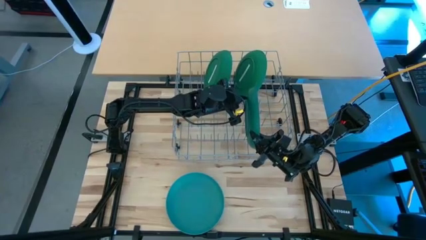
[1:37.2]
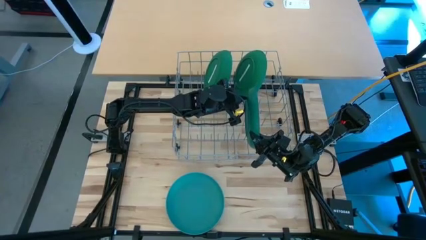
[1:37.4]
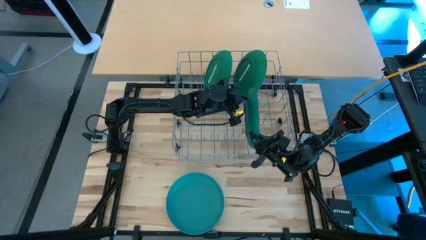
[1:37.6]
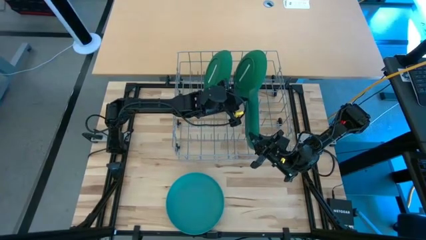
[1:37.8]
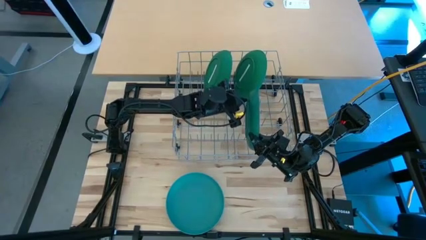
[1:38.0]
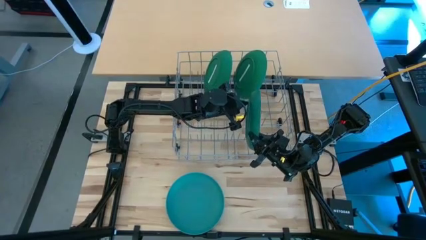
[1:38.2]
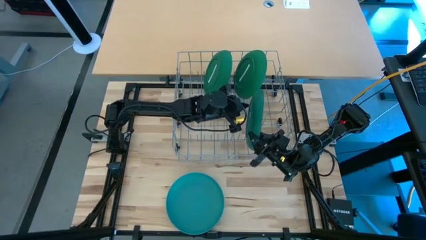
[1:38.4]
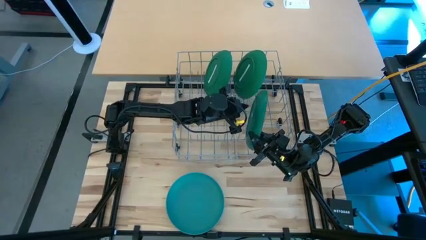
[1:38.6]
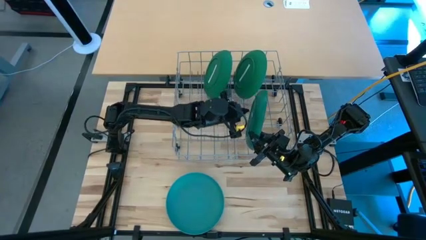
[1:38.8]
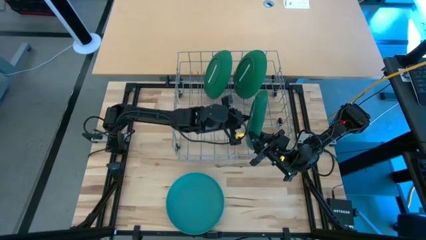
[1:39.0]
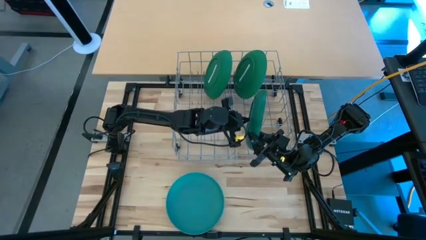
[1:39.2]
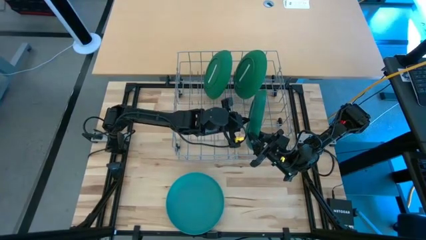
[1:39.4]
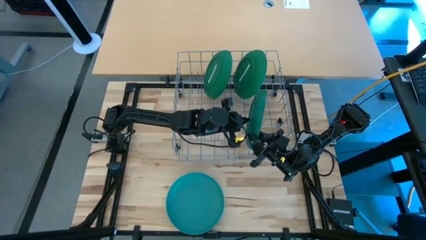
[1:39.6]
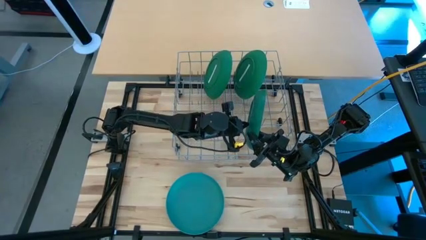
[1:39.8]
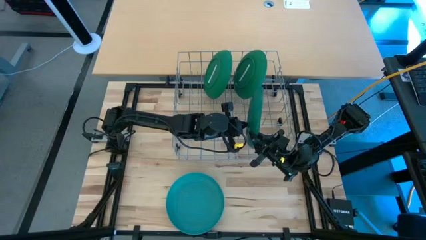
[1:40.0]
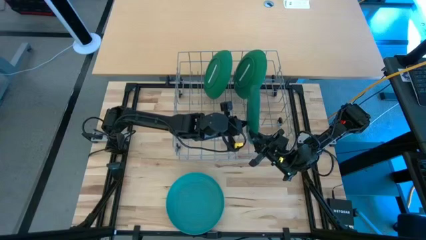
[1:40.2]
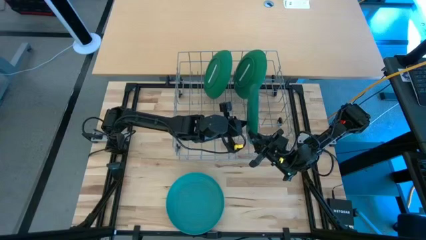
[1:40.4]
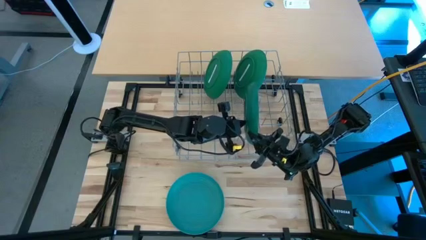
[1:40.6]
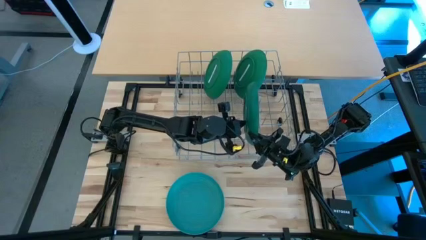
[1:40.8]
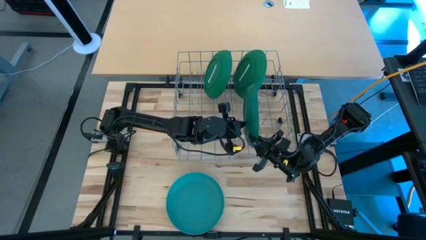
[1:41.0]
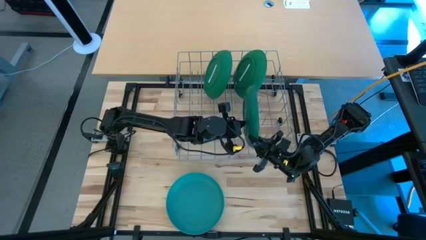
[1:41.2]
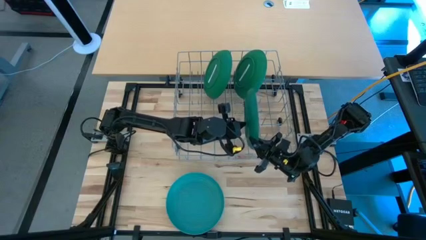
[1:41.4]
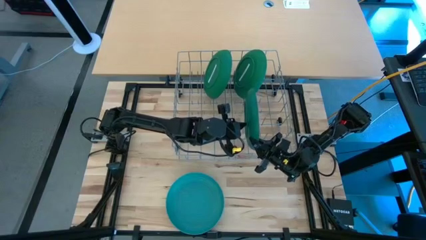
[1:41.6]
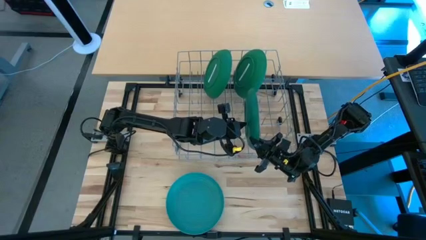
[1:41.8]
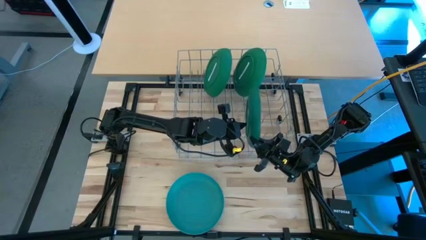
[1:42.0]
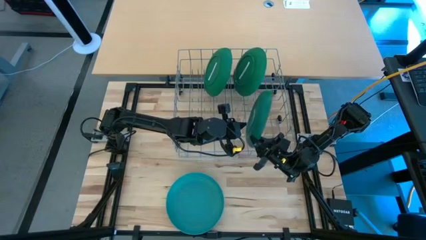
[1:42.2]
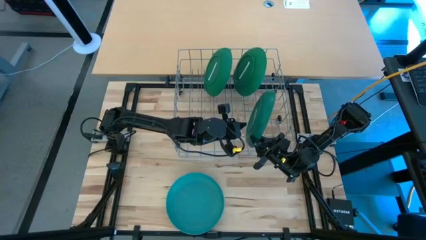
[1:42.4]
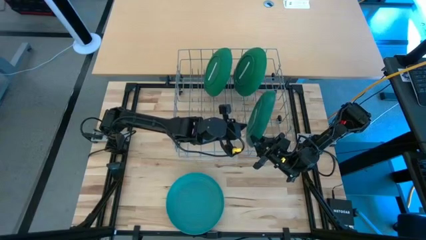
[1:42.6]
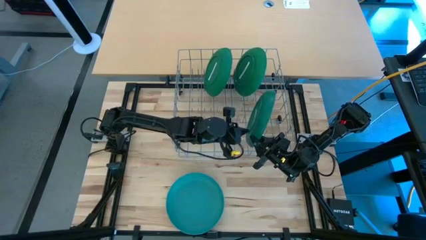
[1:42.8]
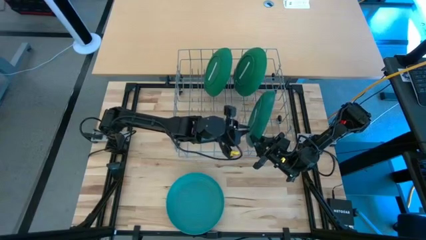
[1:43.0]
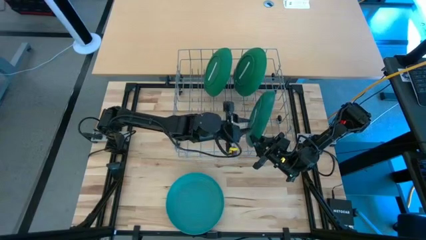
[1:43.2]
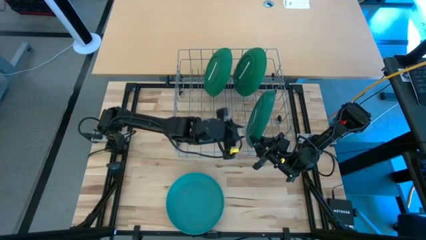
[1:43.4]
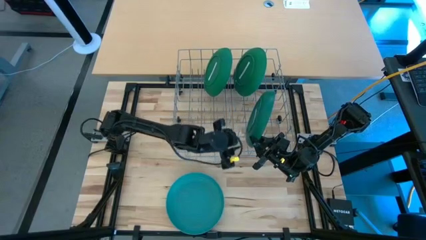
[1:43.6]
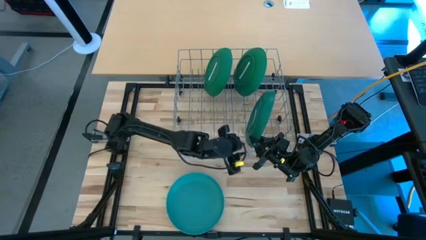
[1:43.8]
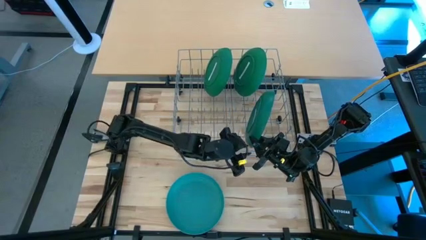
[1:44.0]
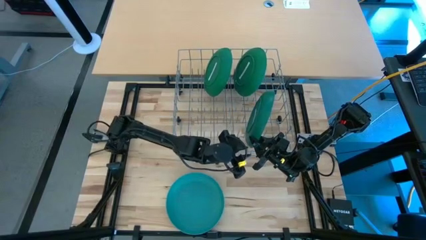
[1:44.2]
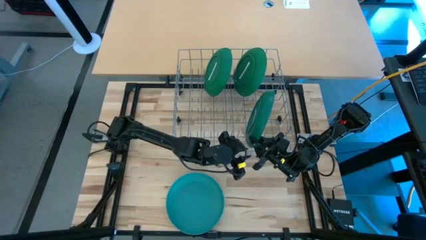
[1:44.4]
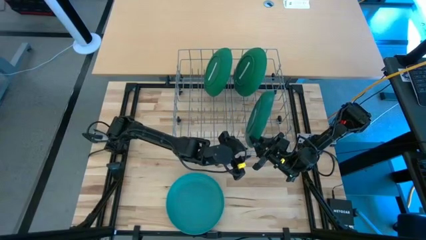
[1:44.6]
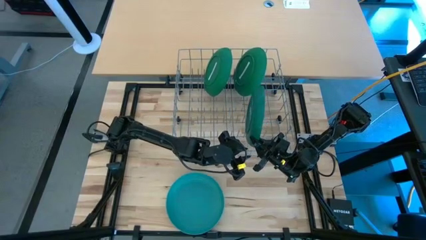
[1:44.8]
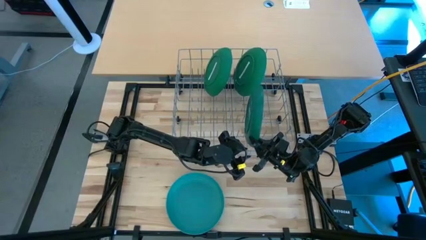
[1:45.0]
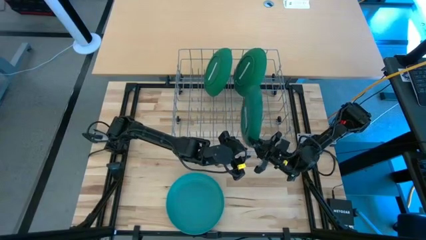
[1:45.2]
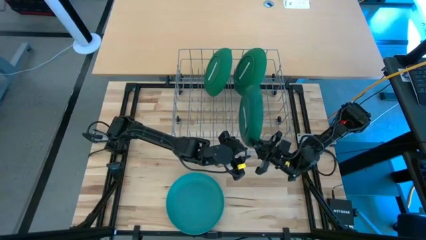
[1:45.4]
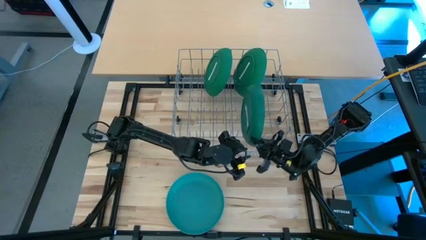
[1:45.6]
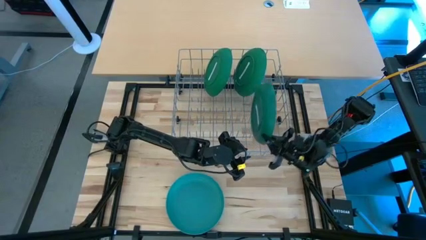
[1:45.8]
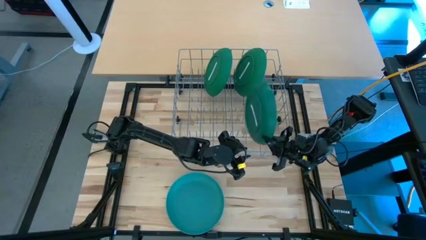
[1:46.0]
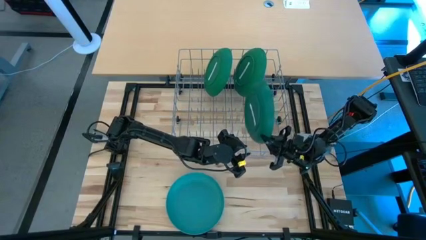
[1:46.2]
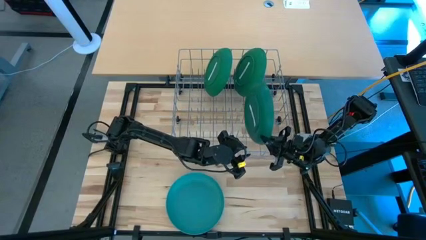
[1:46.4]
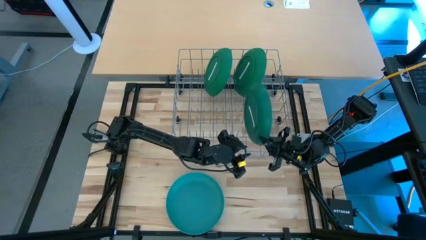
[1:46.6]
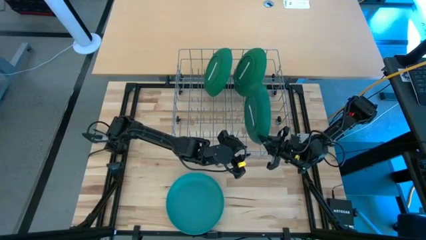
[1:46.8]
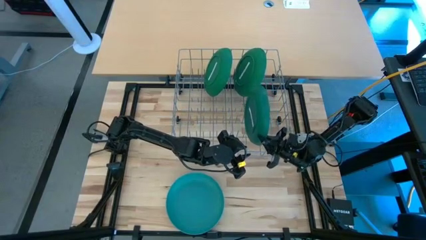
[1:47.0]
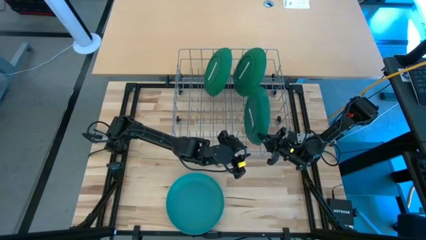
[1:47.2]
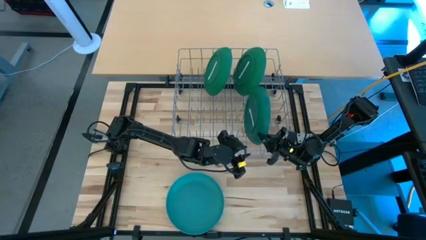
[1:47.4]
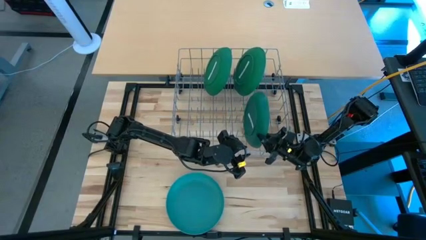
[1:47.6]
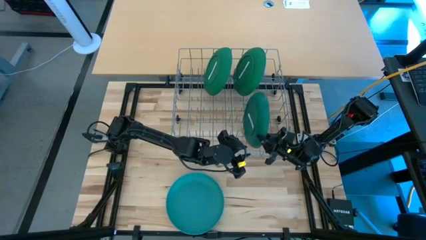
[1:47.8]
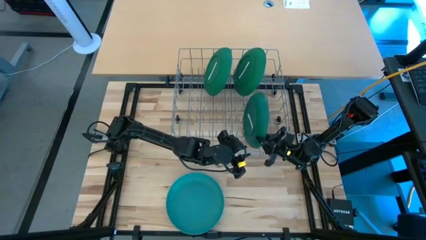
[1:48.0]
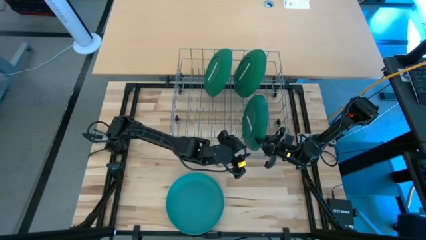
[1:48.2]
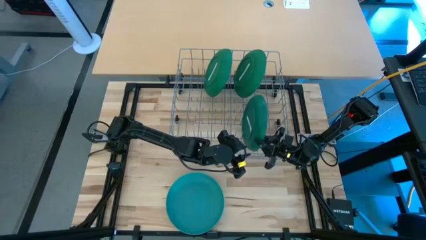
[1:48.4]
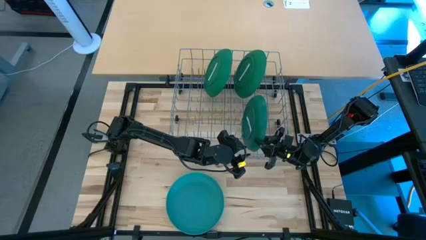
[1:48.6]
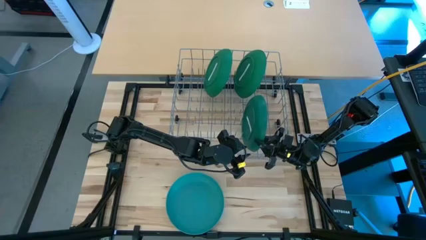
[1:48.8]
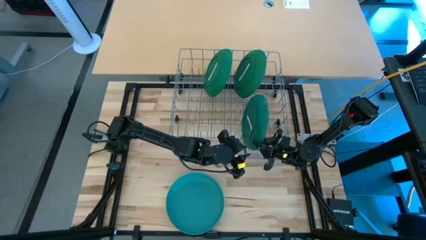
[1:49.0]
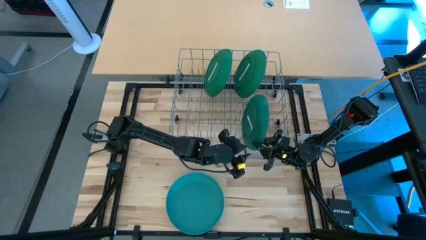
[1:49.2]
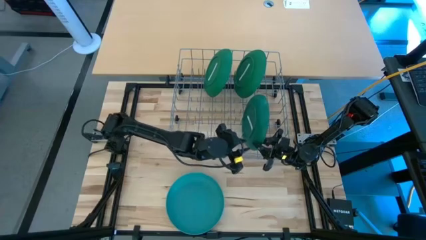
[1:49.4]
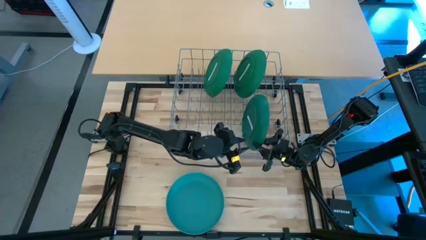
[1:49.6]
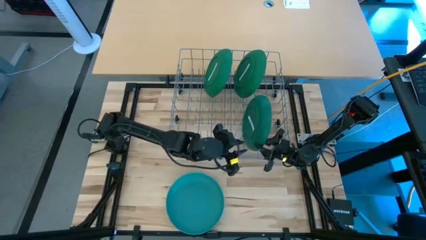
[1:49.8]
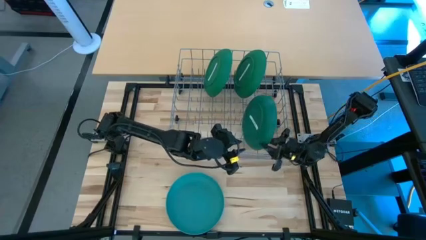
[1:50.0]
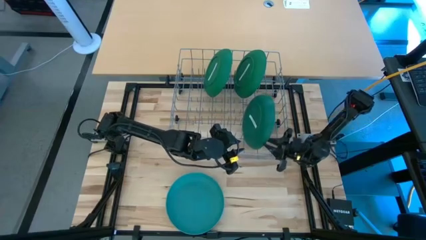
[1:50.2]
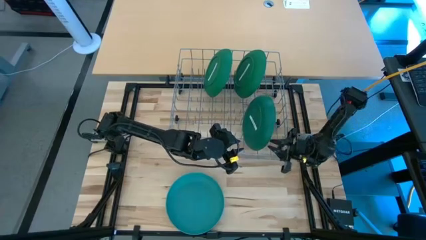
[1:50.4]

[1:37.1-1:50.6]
Task: Sort dishes
Put the green plate in the dish rack
